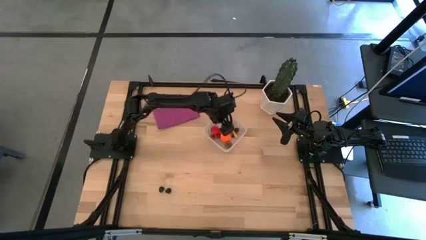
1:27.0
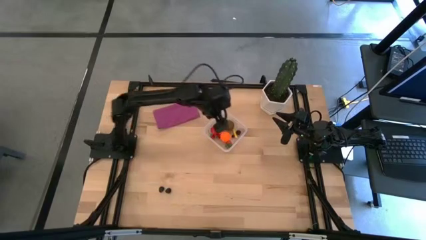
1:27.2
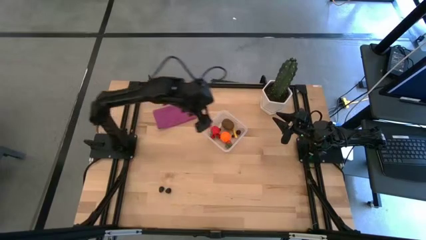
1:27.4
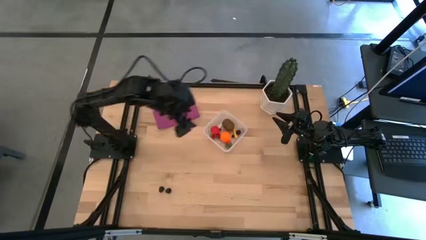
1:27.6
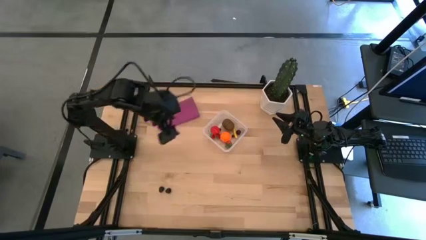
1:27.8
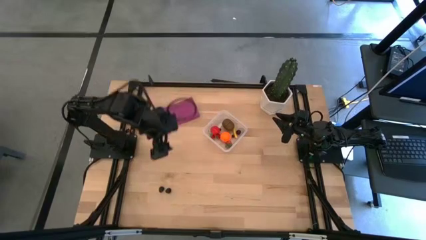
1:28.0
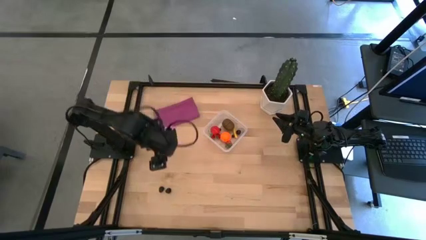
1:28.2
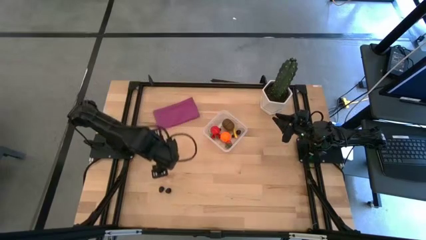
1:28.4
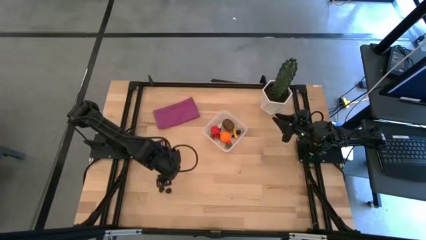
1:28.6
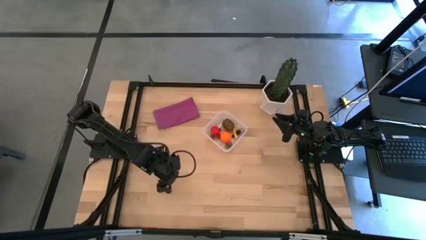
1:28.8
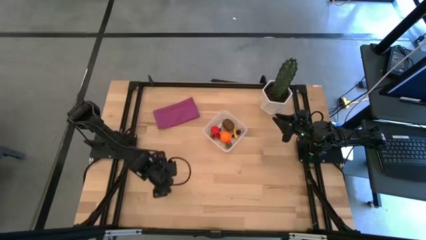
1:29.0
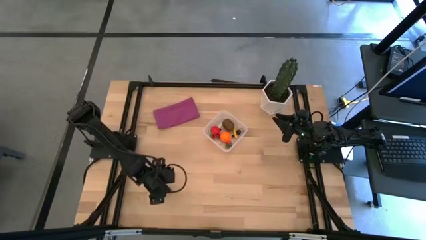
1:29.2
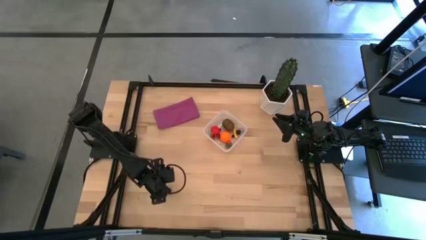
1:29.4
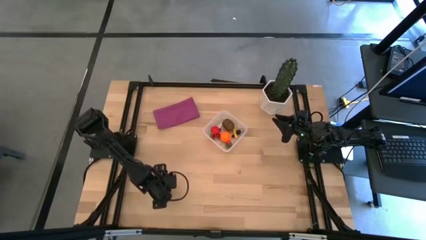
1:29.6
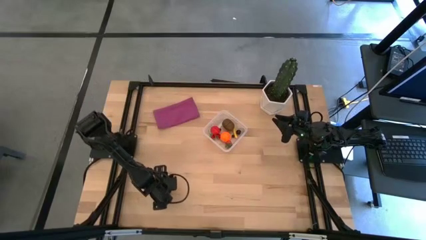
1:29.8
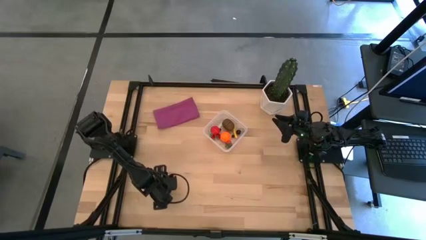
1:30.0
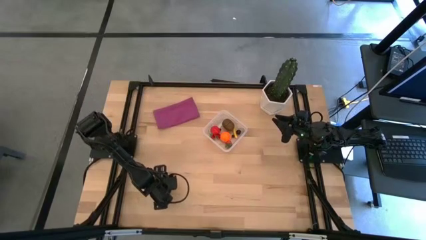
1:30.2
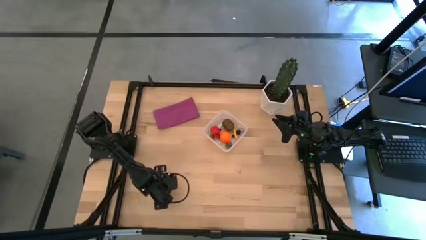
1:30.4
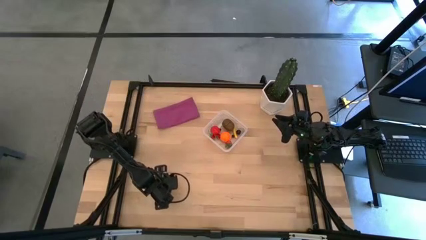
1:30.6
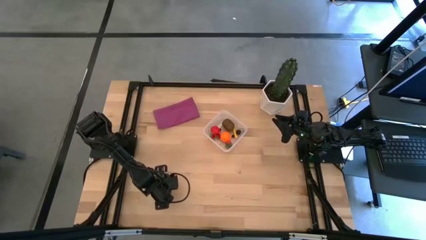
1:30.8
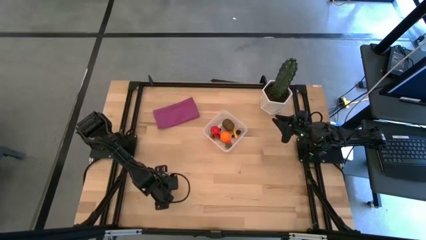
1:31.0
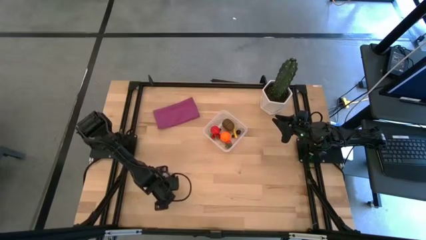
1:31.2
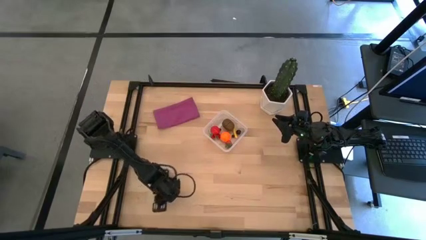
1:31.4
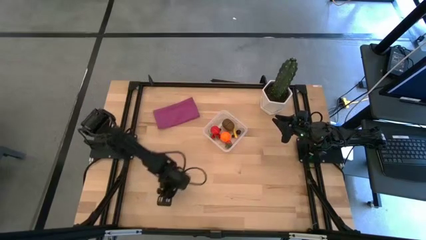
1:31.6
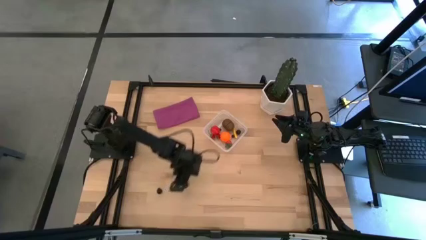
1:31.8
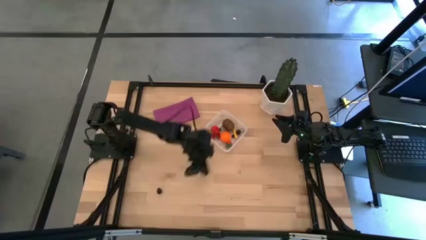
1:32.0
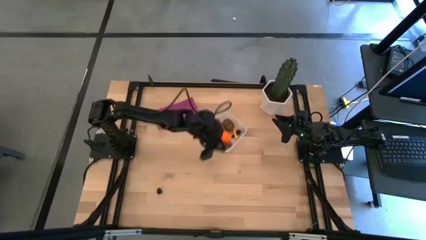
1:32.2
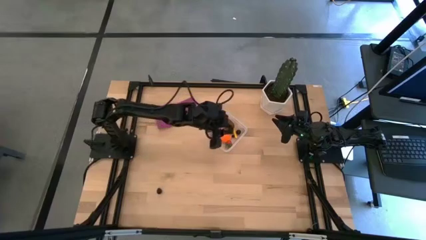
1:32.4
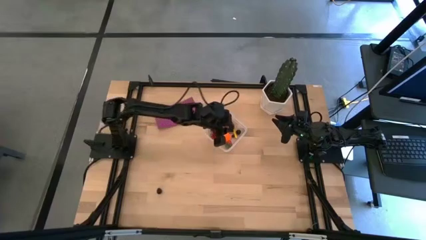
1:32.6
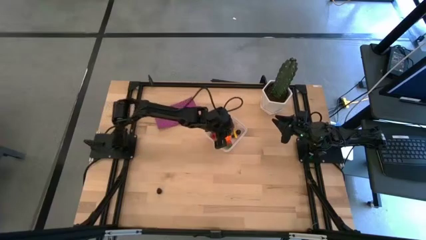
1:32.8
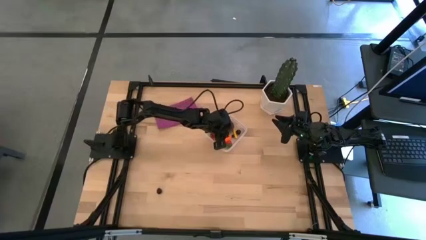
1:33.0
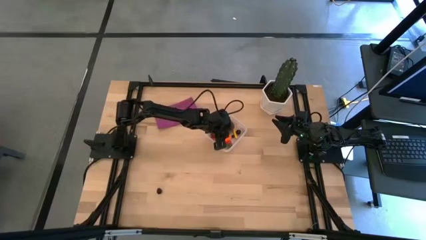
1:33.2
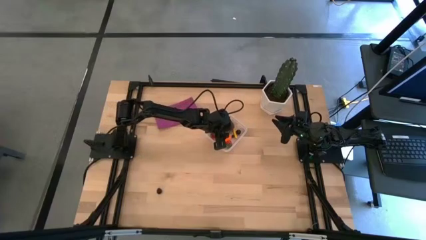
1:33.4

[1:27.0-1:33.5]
Task: Pick and placing Produce into tupperware
Put the right blackberry into the transparent container

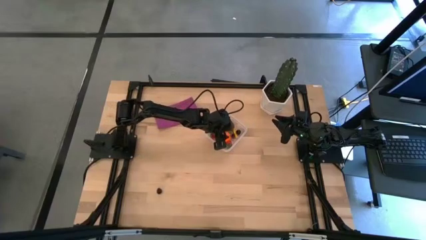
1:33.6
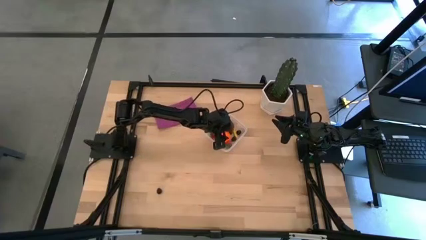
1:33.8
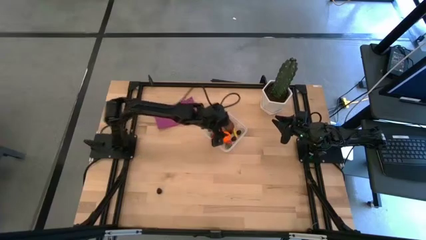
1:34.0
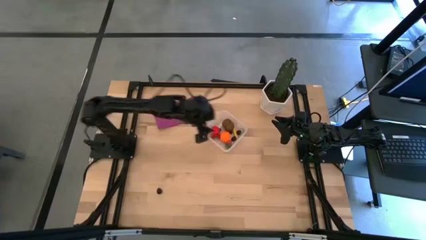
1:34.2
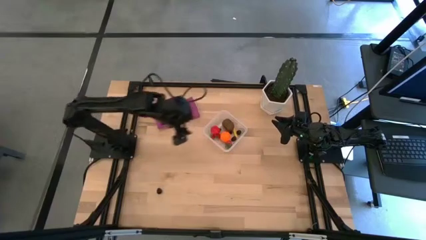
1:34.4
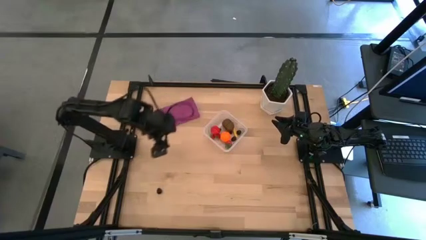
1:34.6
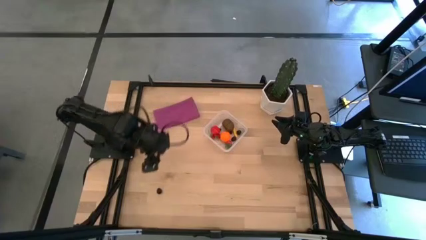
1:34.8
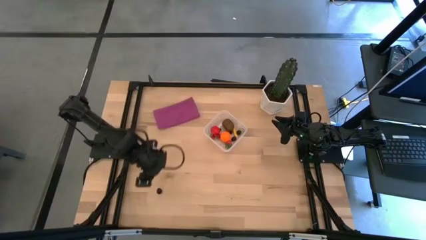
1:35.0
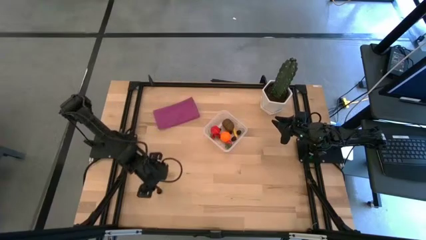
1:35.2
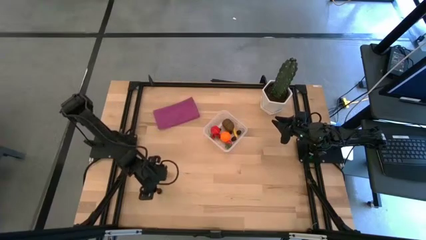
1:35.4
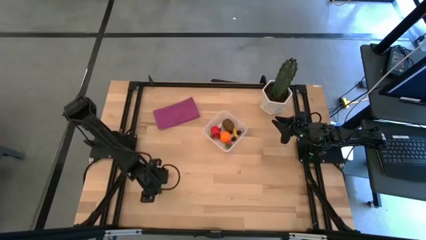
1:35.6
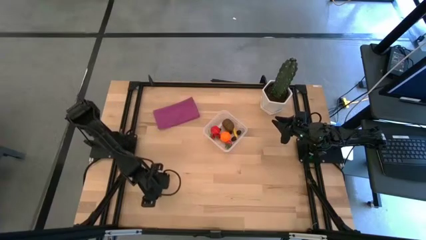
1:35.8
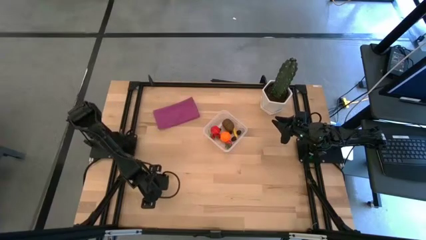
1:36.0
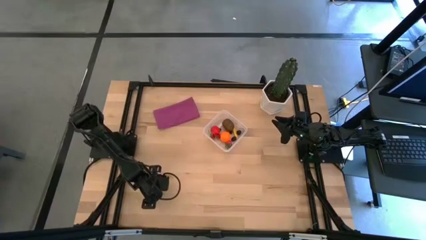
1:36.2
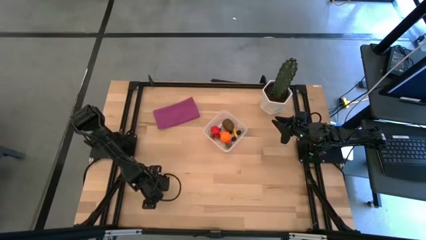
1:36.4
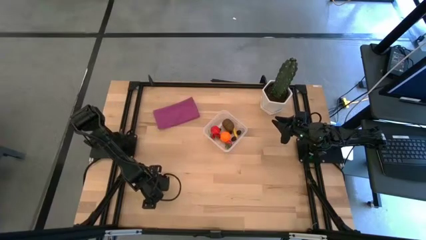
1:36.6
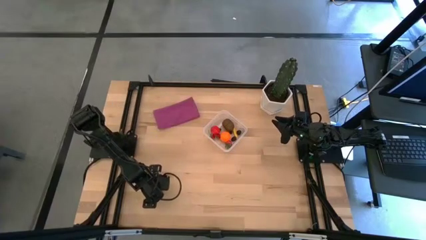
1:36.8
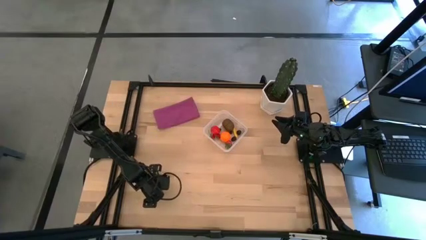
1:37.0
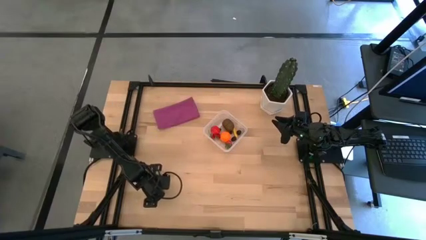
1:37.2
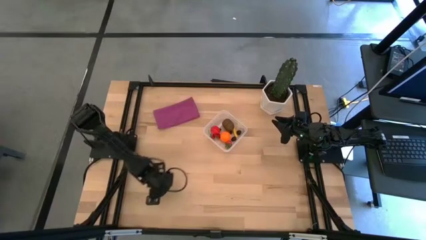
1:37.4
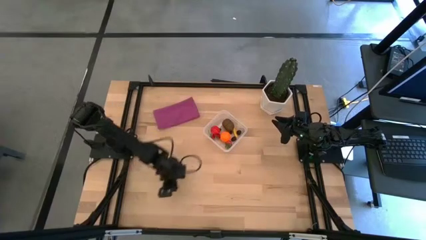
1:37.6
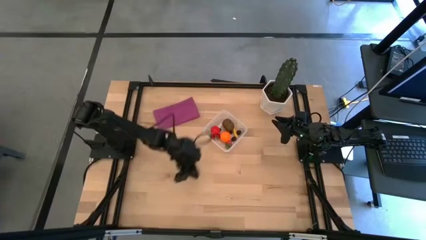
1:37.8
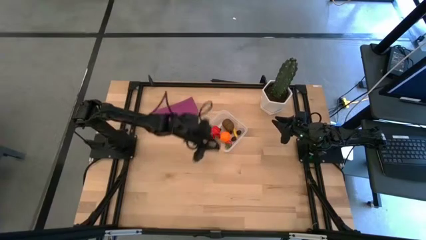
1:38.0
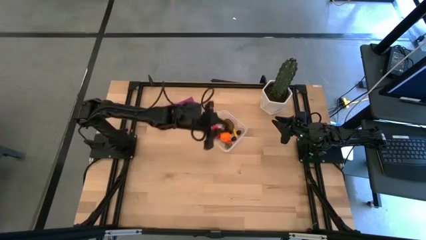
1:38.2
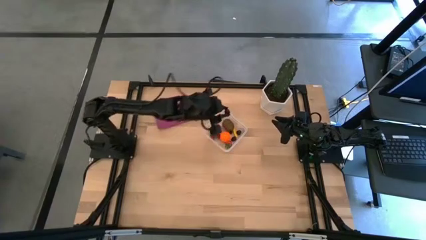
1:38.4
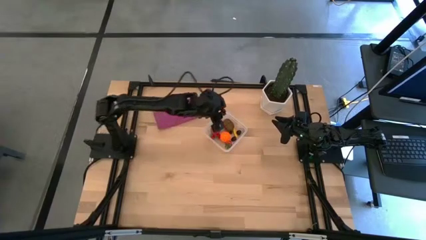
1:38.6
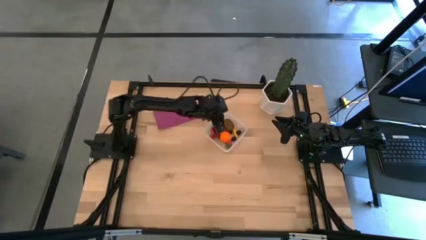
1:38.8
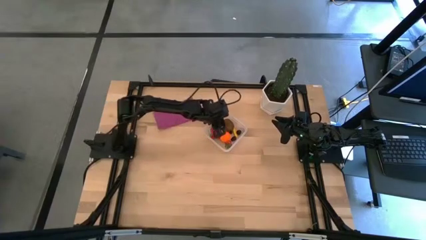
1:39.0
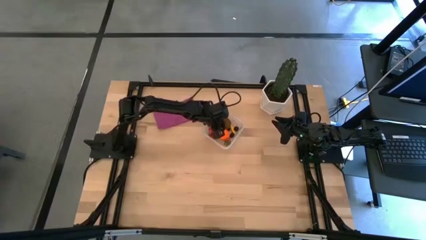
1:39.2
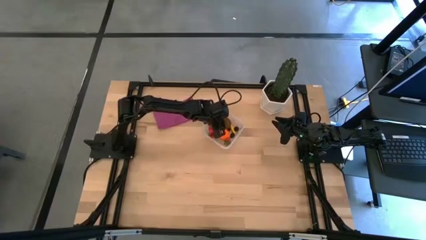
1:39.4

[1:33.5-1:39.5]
Put the blackberry into the transparent container

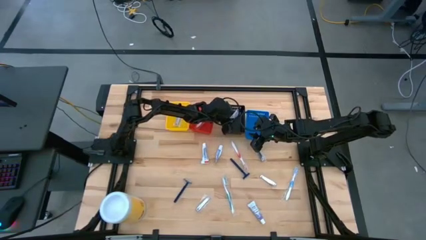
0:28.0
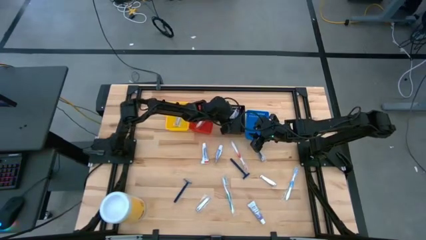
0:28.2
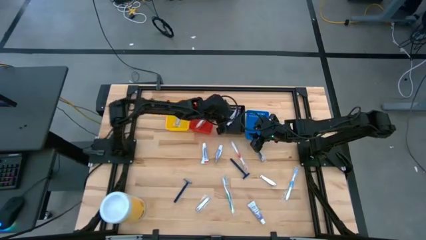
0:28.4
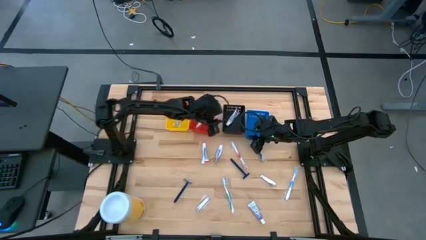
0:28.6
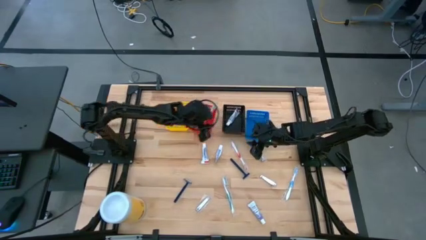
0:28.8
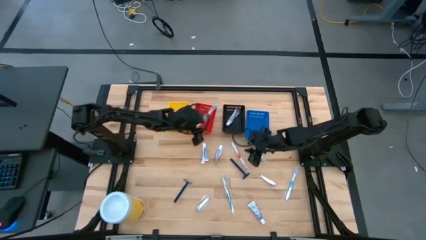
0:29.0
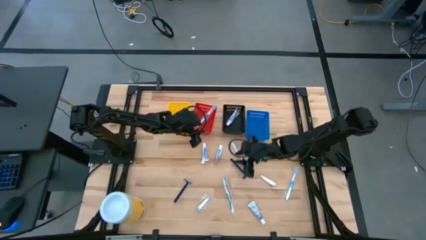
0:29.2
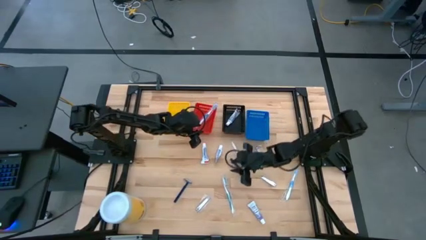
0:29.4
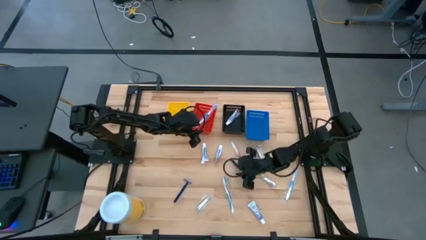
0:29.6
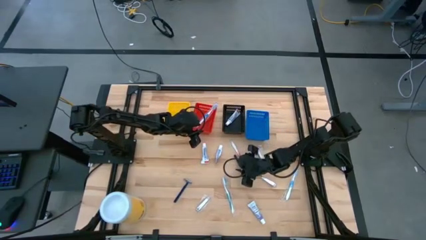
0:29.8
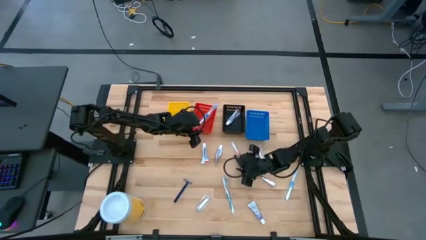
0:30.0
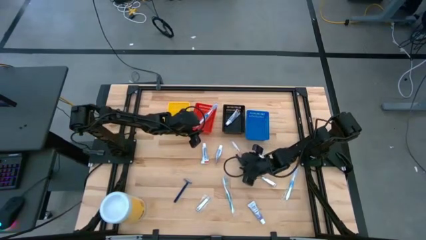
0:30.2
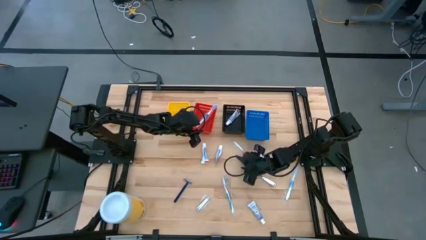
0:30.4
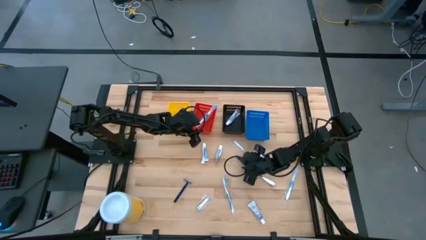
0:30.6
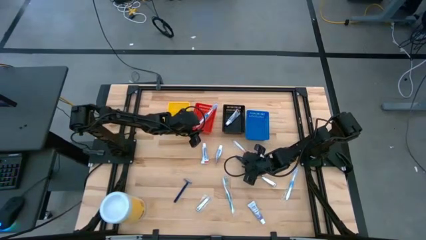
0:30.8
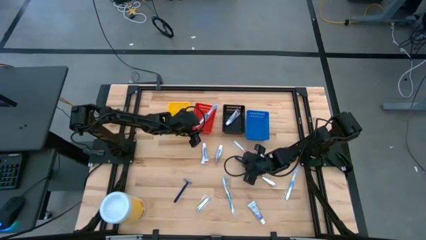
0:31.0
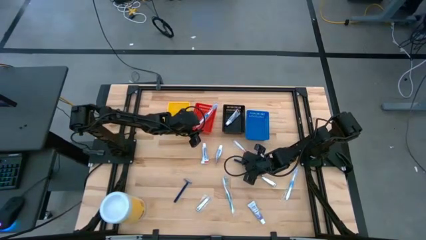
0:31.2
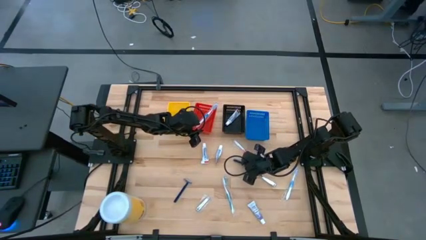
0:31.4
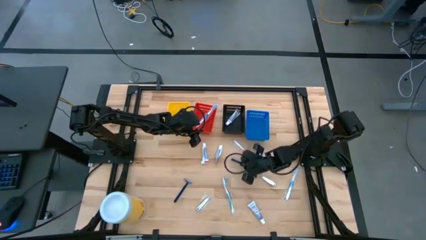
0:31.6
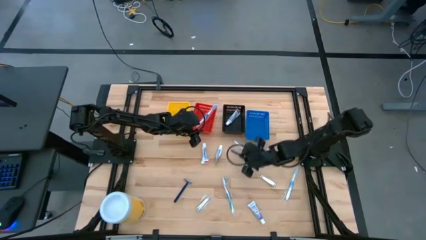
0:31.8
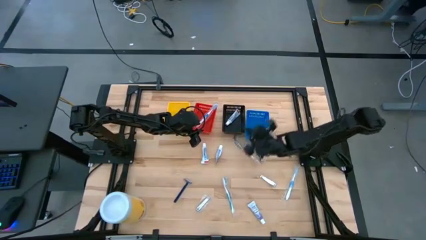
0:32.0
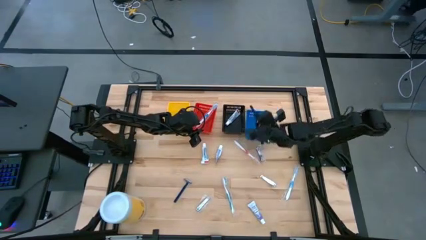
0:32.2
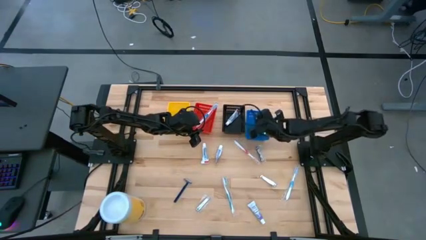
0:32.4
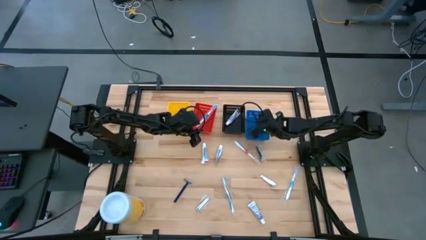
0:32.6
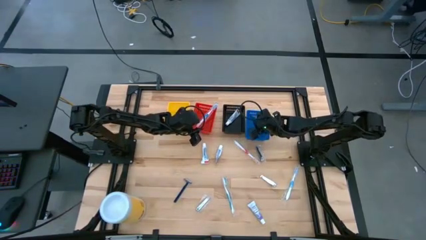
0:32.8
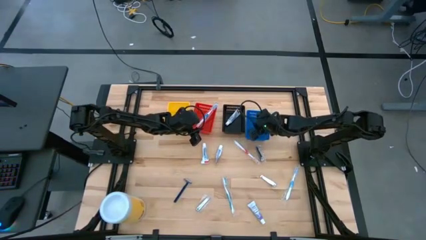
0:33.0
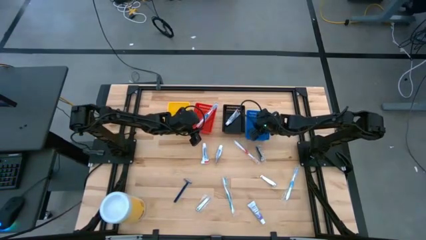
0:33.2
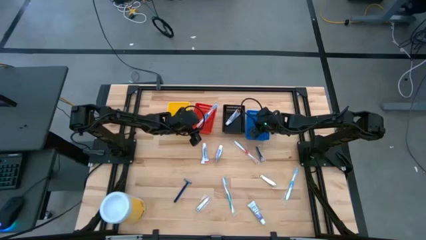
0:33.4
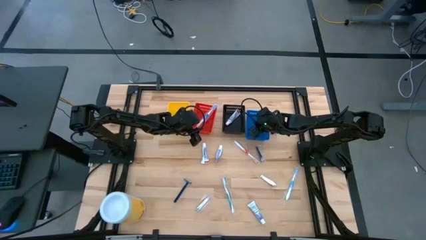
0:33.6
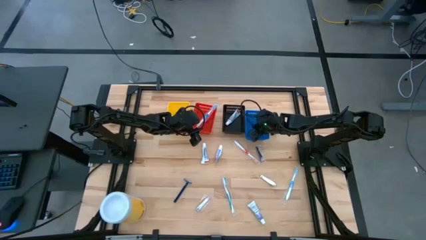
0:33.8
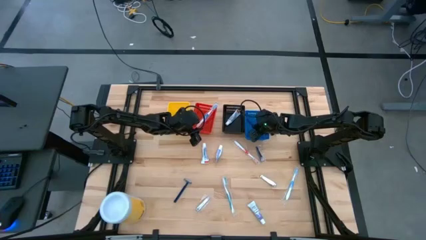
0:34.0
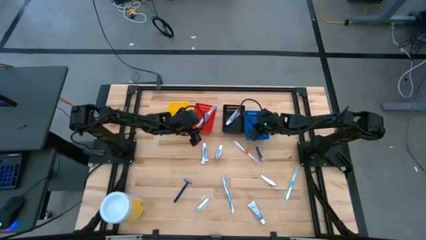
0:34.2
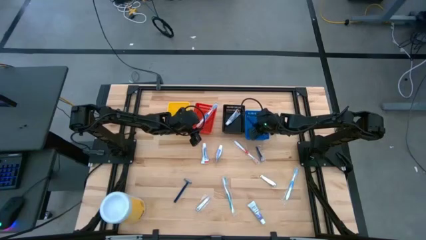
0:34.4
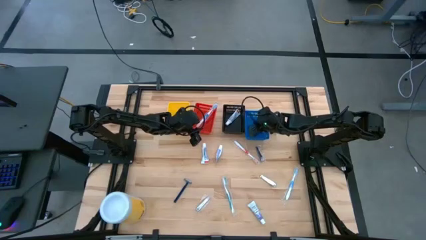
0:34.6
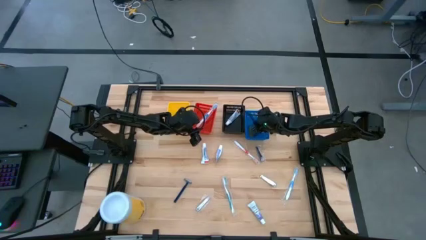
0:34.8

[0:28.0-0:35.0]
Task: Pick & Place Travel size toiletries
Put the blue razor into the blue bin
